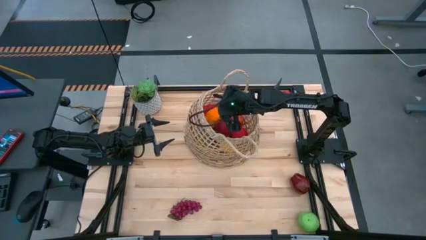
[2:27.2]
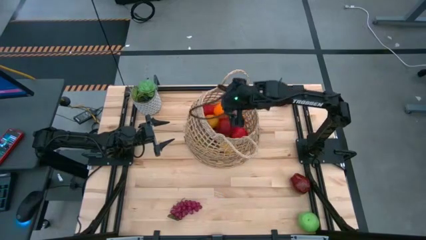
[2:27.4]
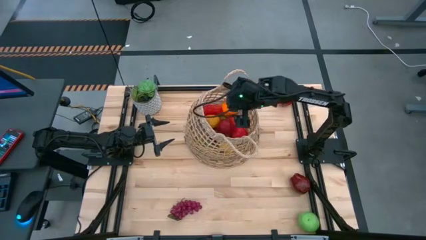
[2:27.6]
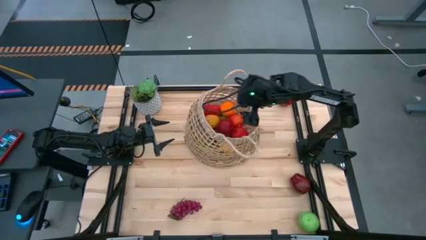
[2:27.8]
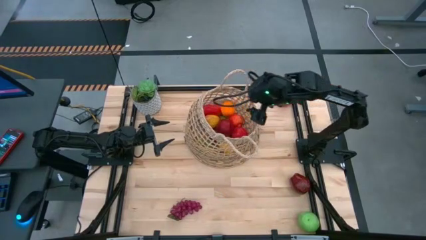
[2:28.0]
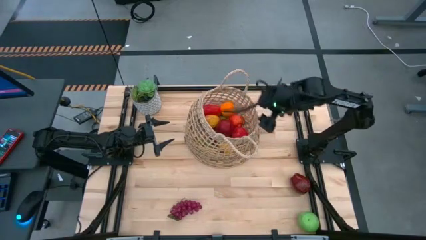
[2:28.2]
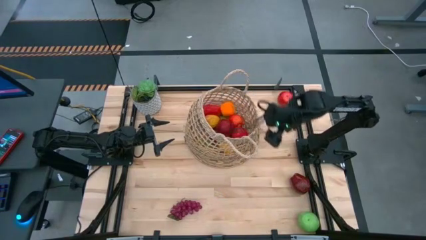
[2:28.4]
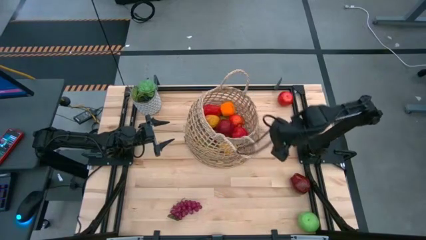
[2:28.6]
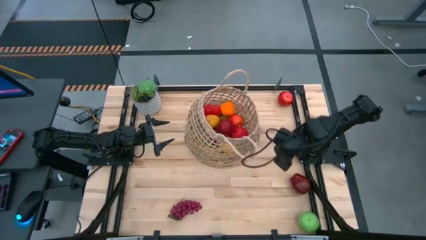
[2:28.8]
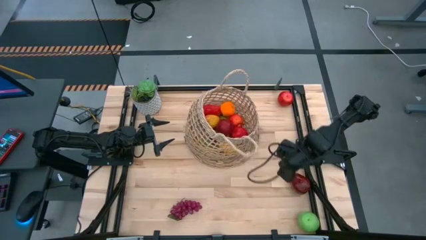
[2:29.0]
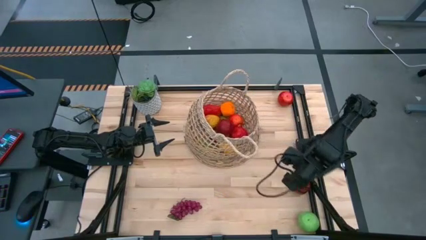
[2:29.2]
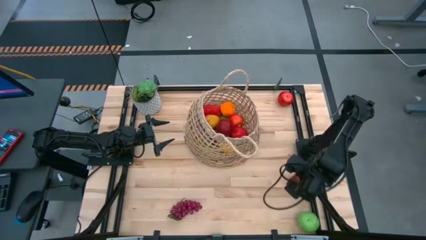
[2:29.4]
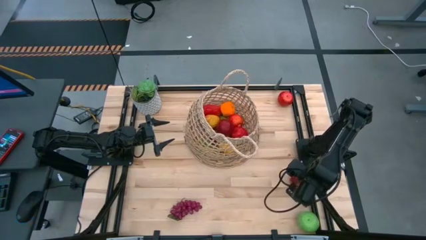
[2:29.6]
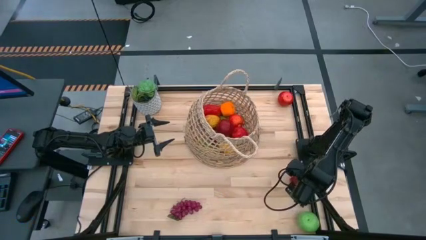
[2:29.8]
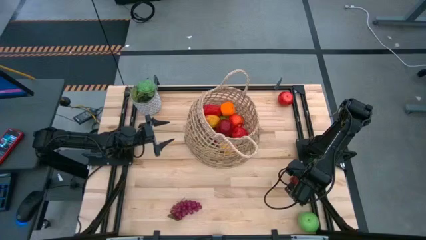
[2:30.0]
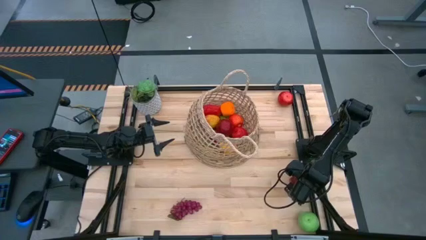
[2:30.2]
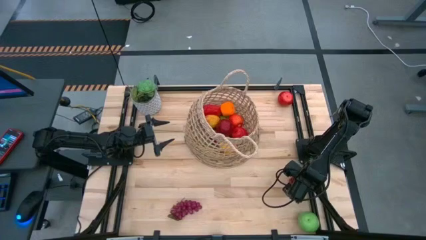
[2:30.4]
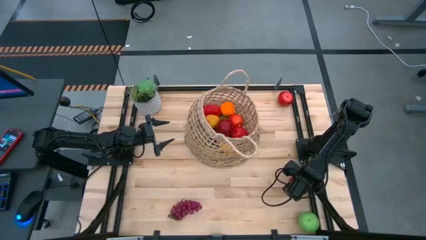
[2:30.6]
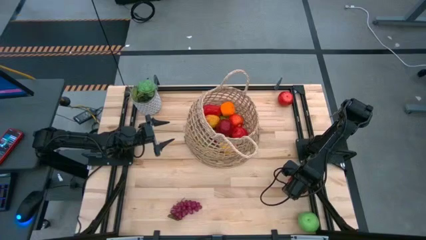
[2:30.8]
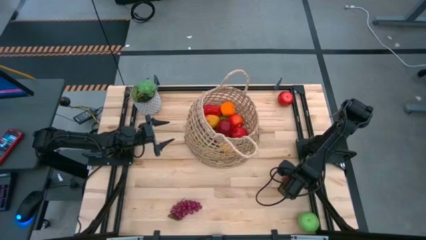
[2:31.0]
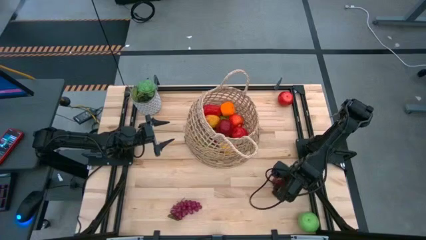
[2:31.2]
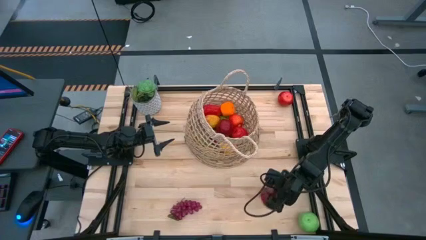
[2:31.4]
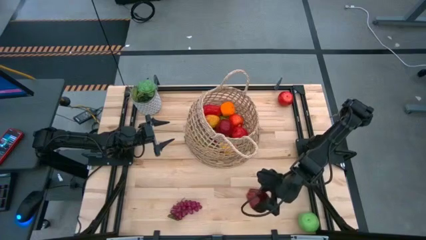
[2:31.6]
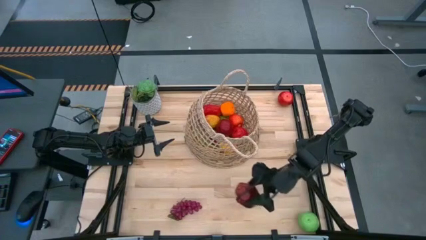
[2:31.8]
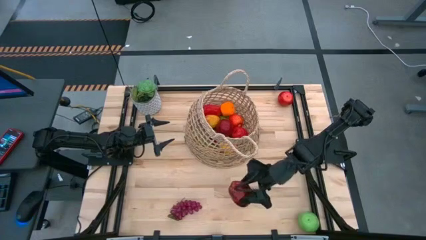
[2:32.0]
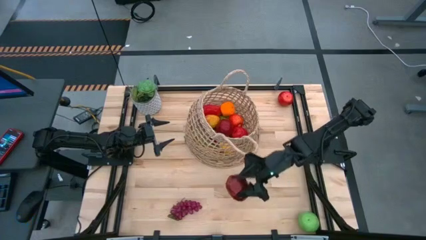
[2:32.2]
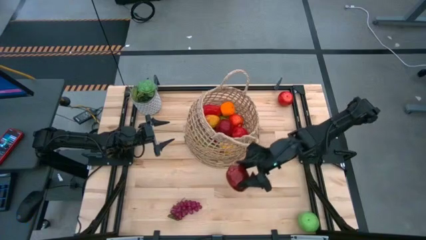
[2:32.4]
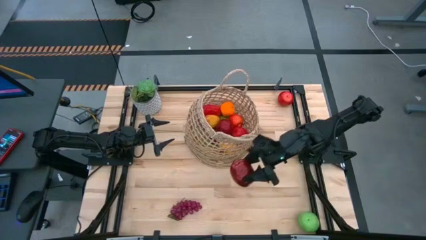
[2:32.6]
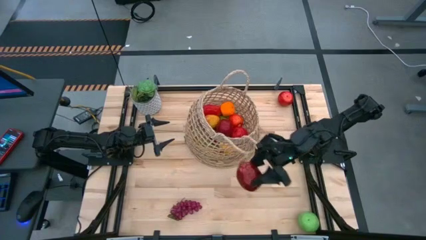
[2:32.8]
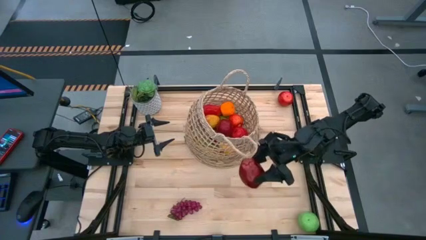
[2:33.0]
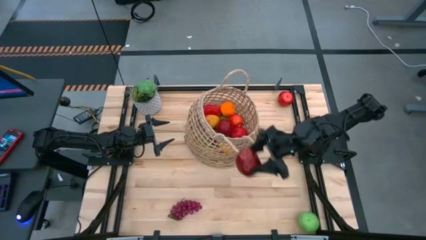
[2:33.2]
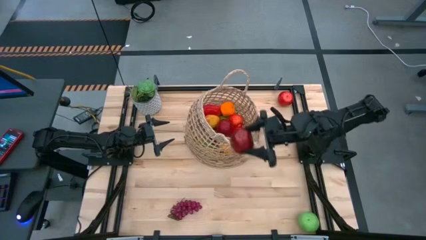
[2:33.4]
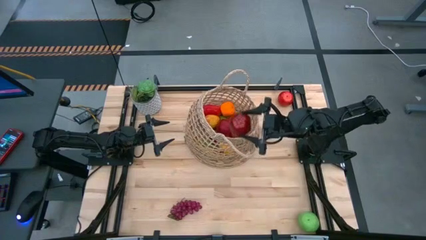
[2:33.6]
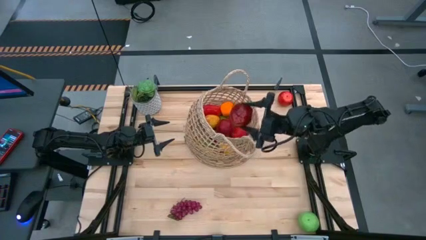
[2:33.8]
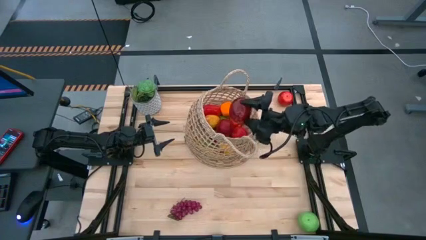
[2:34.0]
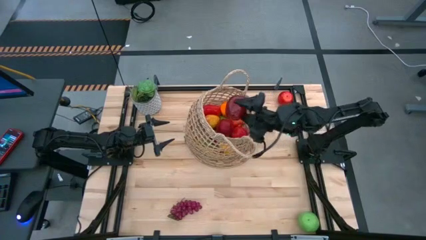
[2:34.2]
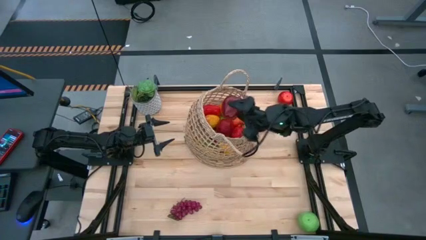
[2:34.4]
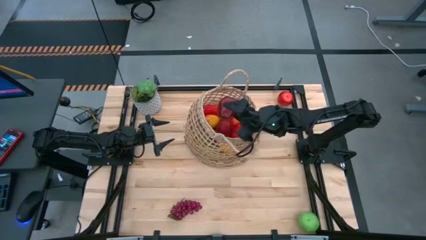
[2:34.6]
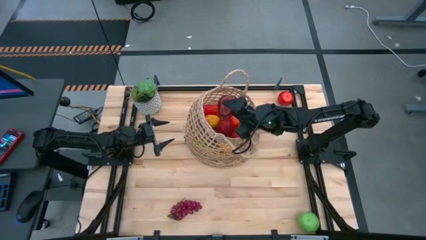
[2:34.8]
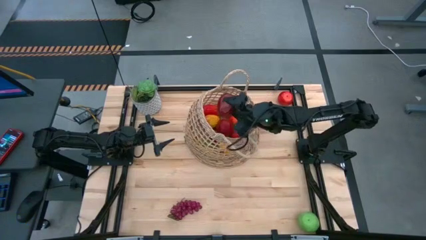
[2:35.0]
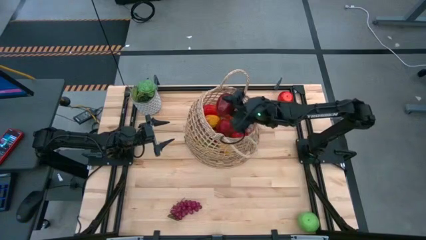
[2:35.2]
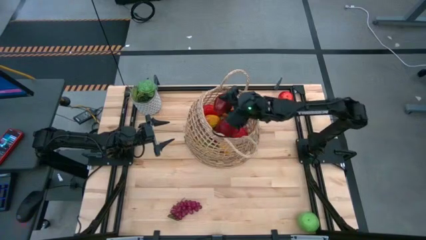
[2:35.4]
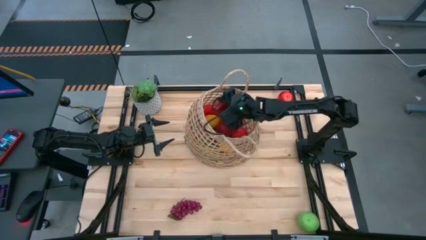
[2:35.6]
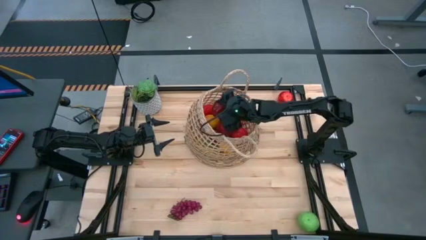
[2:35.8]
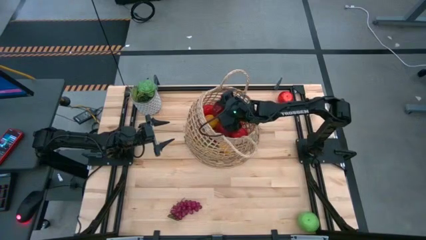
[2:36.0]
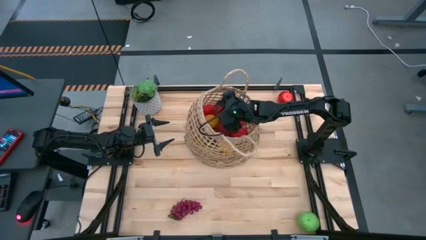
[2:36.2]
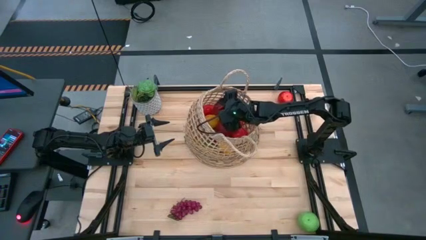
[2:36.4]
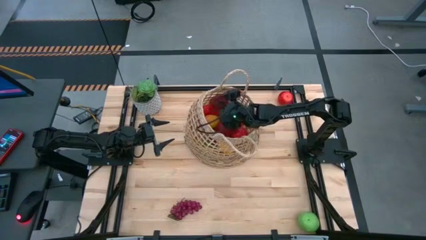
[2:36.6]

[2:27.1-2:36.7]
Task: Build produce basket
Put the red malay apple into the brown basket

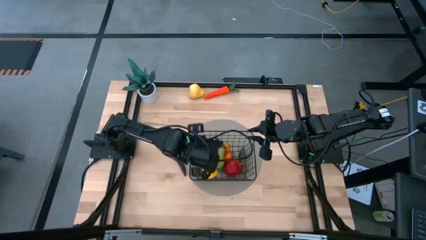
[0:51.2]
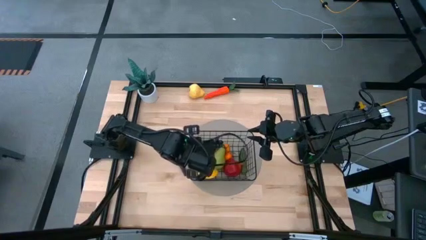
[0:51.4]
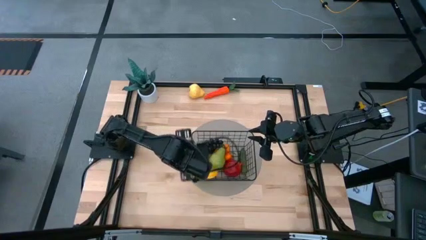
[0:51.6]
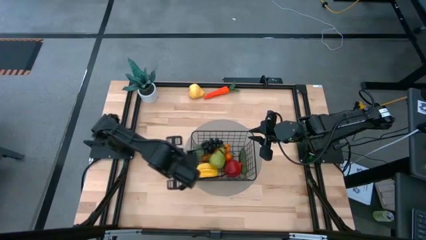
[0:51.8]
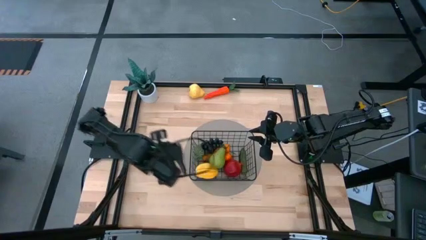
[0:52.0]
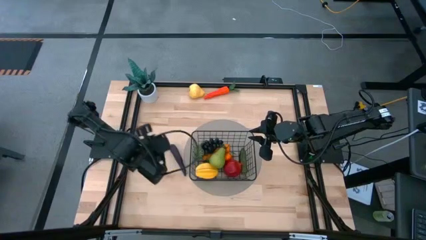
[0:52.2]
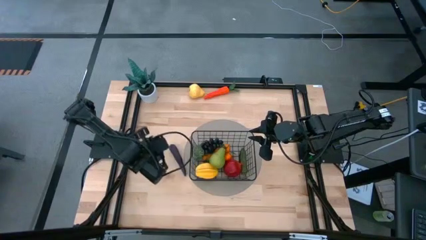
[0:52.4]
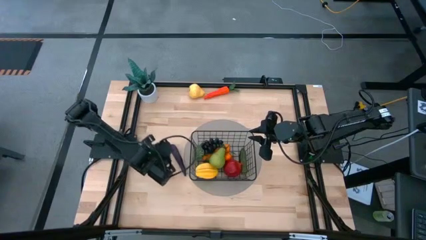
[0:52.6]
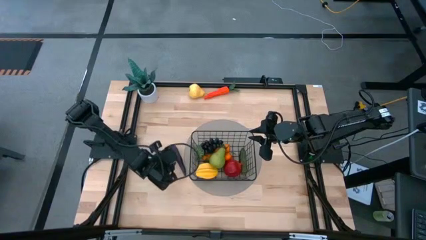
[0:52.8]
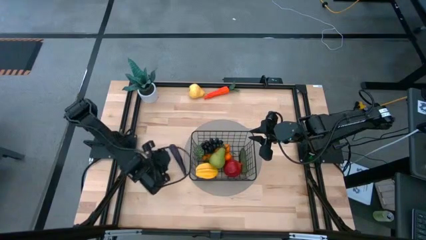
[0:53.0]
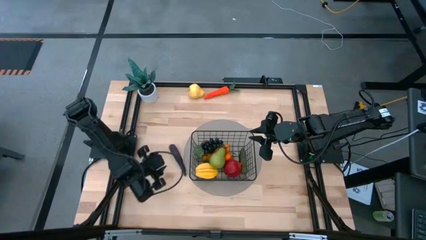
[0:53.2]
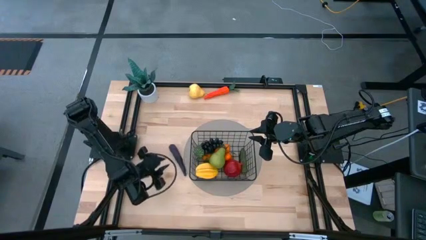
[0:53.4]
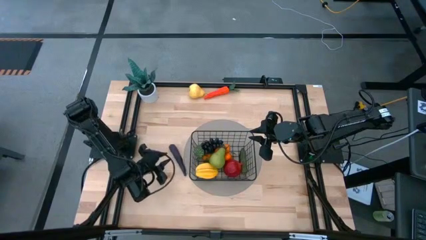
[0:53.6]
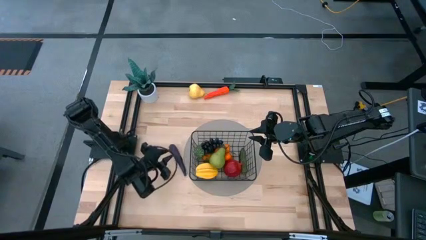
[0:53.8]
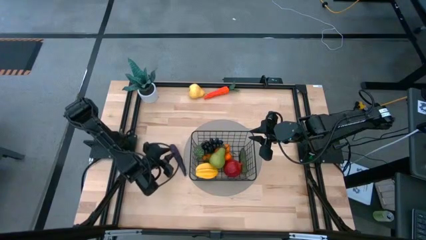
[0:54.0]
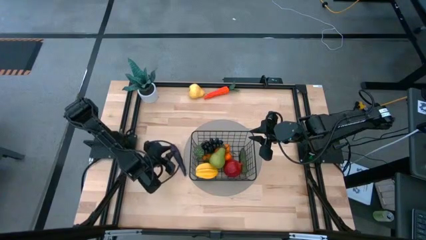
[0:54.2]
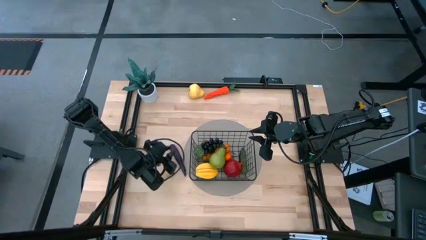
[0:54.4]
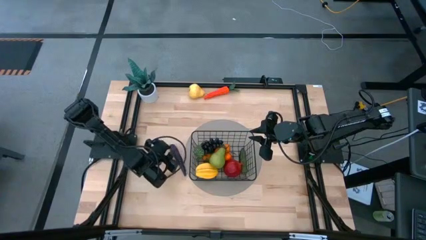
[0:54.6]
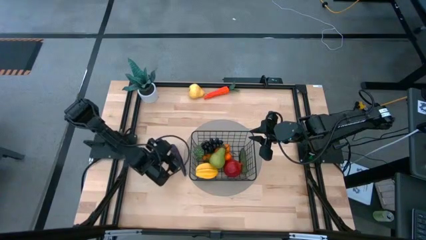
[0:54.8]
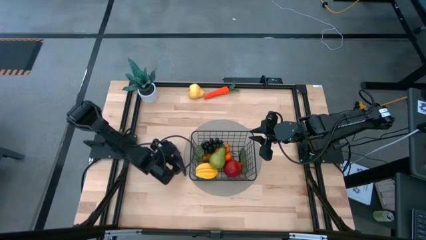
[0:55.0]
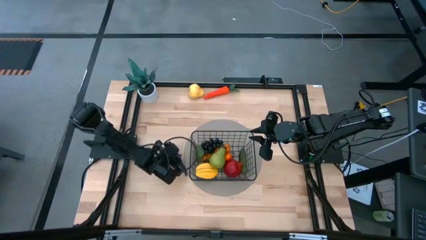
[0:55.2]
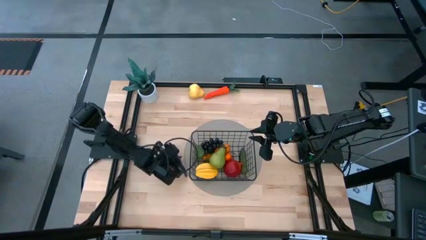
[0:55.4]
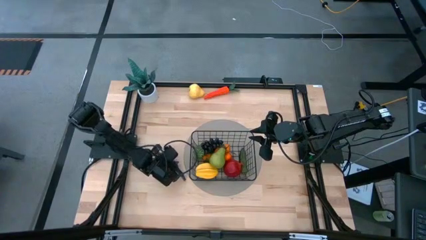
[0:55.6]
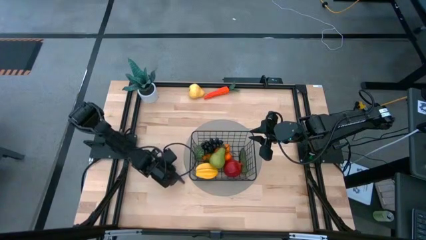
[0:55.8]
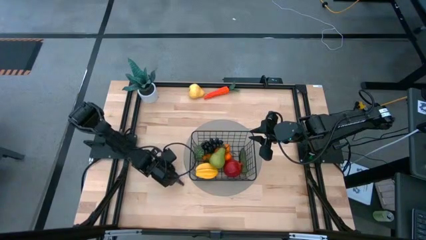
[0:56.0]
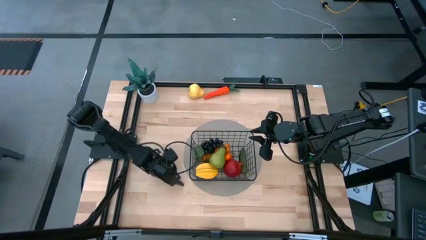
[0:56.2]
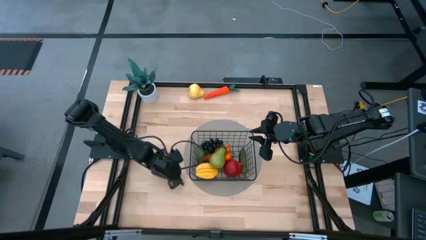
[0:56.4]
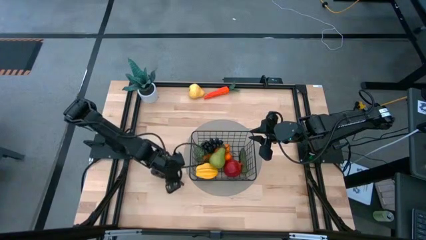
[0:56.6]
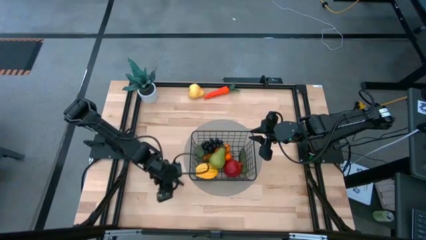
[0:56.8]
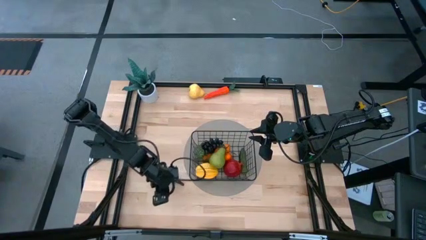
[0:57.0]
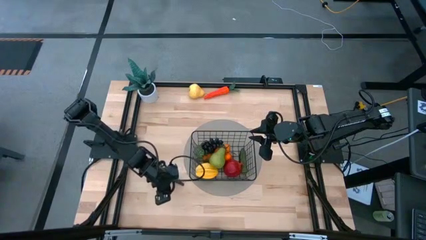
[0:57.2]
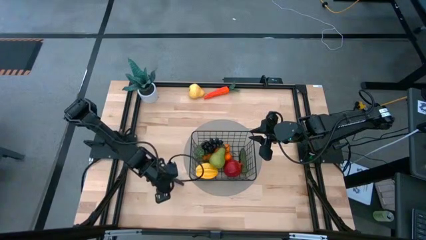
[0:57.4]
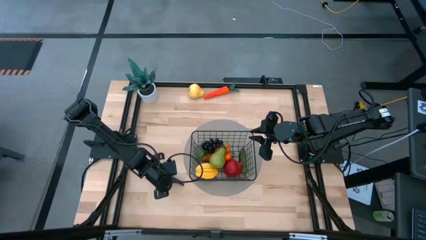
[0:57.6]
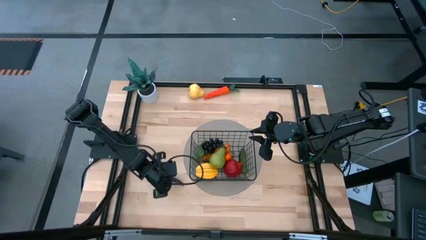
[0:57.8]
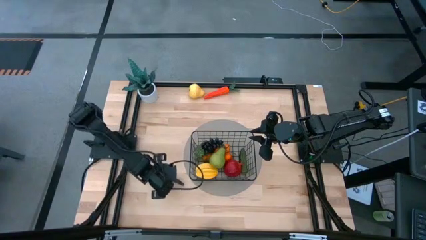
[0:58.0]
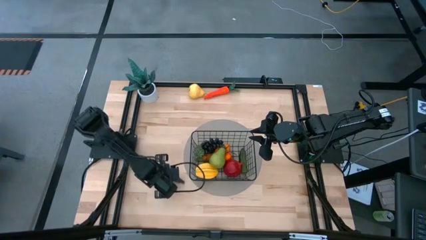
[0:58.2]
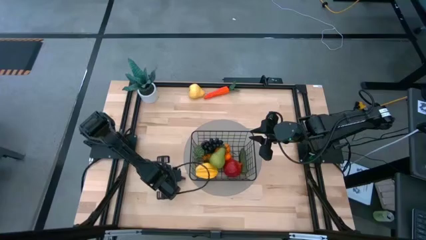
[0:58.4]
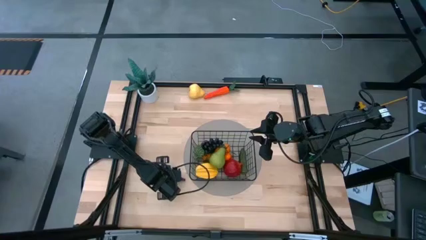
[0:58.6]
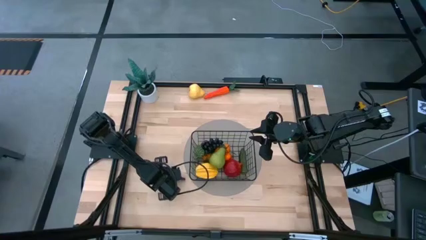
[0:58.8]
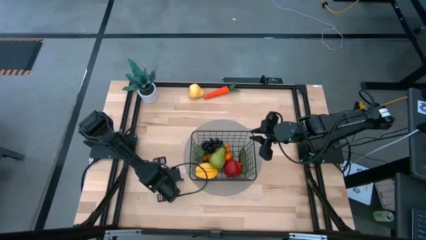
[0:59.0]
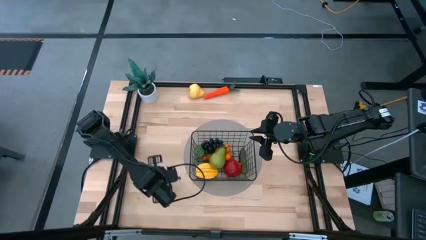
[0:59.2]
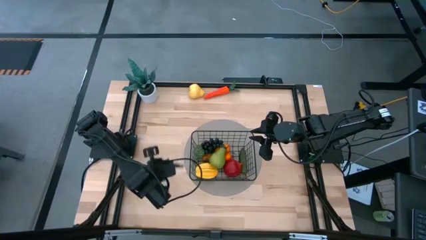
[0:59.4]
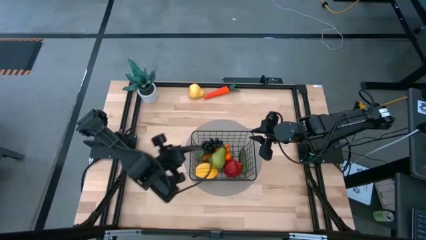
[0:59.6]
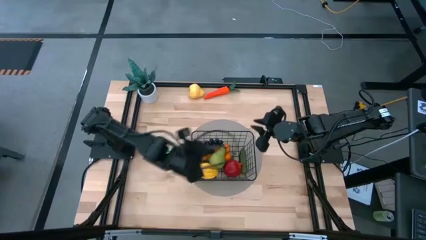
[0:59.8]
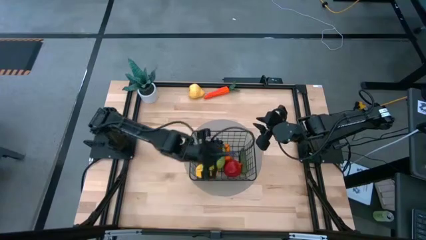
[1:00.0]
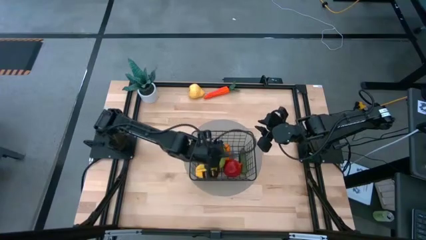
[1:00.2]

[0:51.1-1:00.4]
Task: Build produce basket
Put the purple eggplant into the black wire basket
